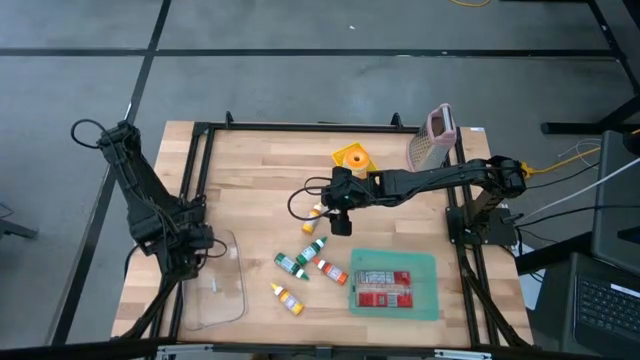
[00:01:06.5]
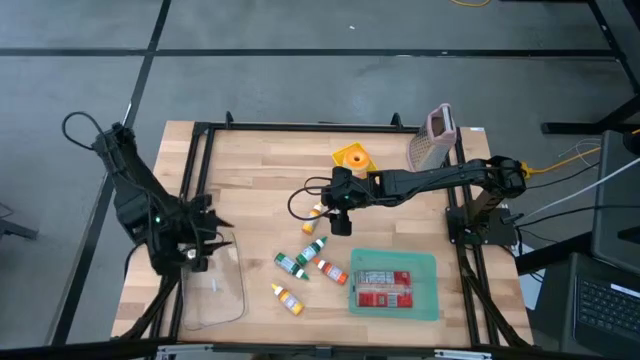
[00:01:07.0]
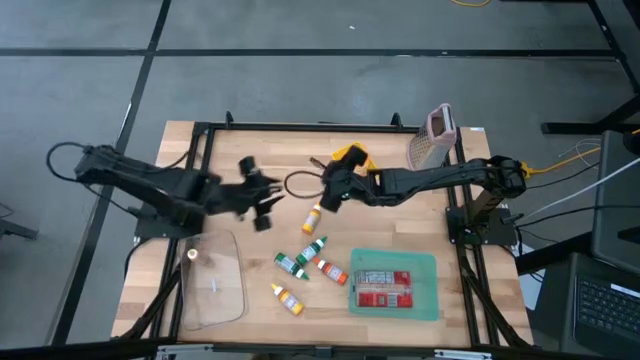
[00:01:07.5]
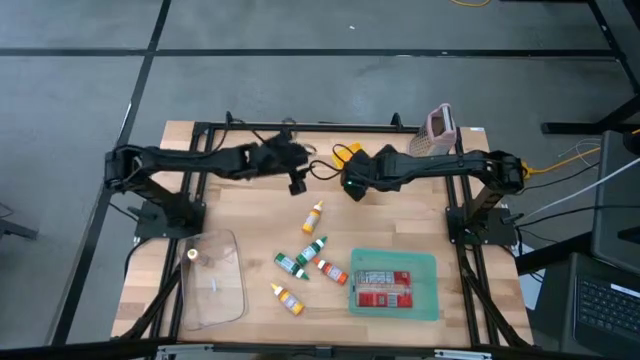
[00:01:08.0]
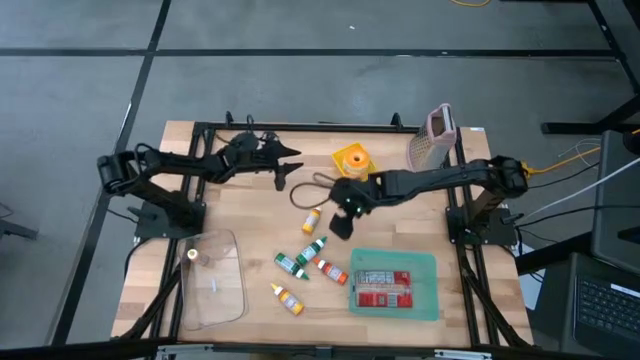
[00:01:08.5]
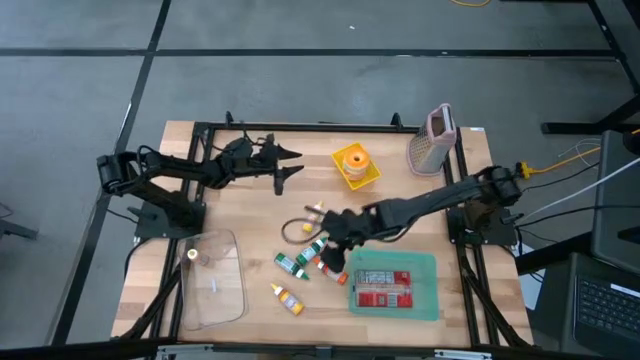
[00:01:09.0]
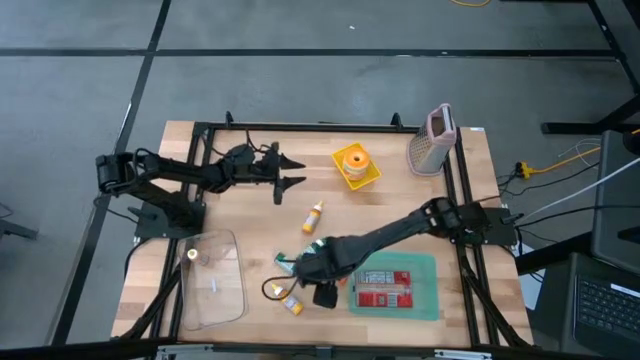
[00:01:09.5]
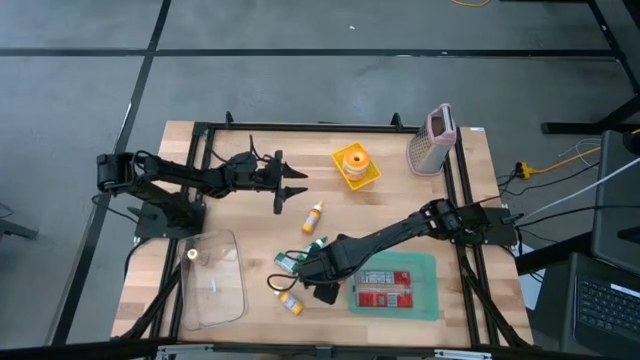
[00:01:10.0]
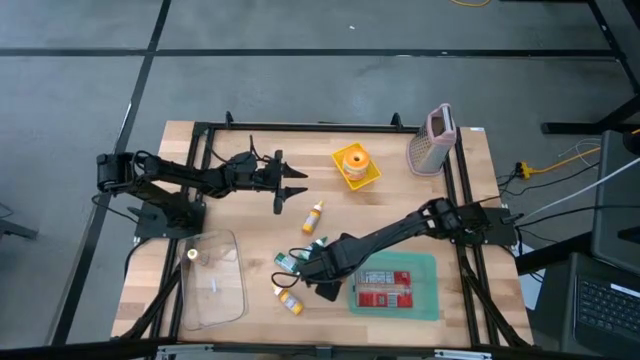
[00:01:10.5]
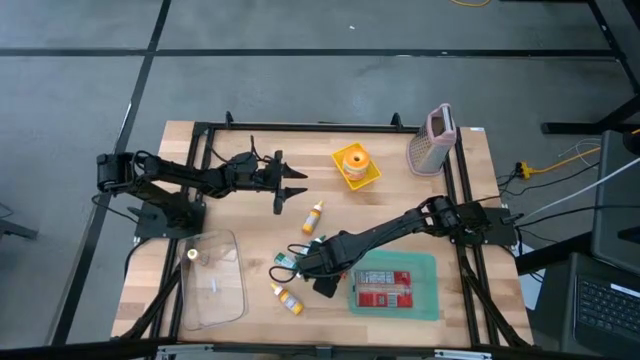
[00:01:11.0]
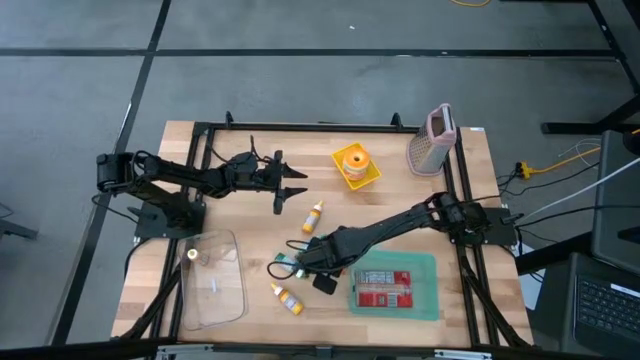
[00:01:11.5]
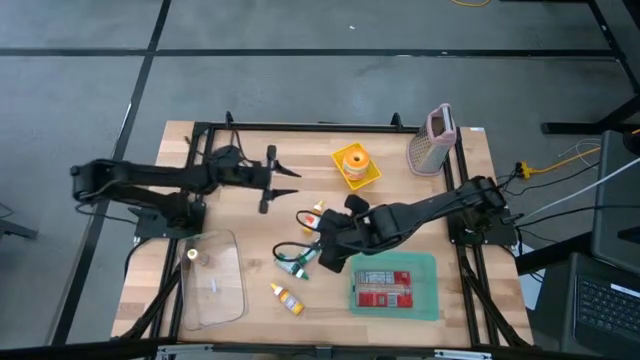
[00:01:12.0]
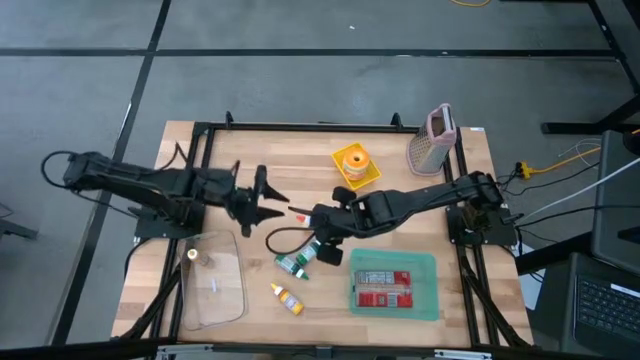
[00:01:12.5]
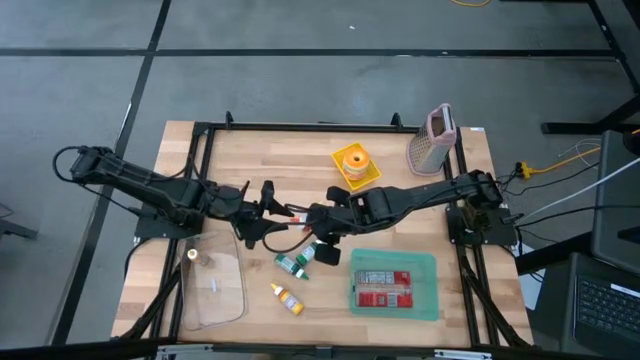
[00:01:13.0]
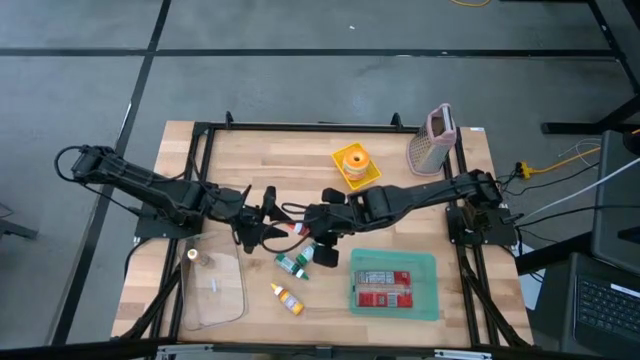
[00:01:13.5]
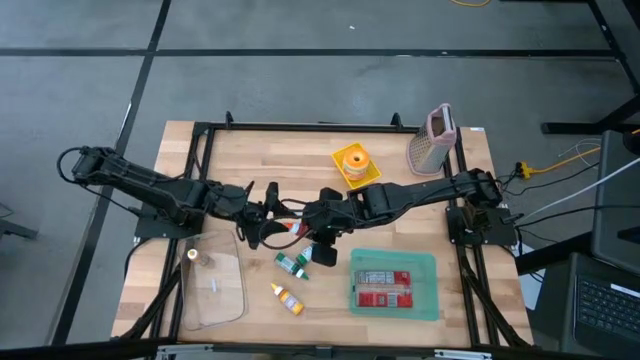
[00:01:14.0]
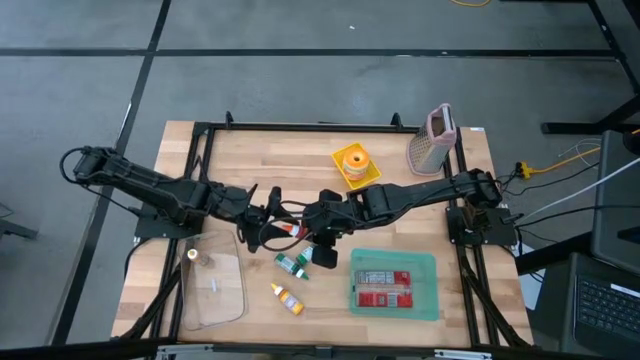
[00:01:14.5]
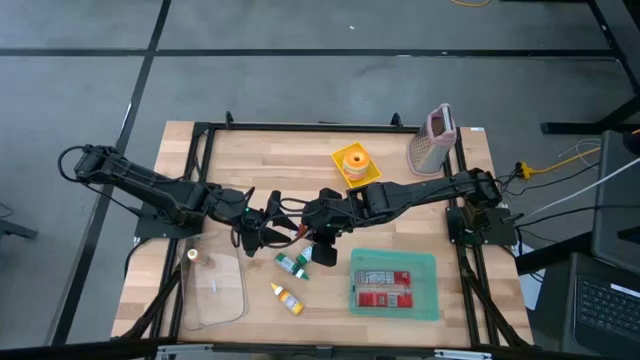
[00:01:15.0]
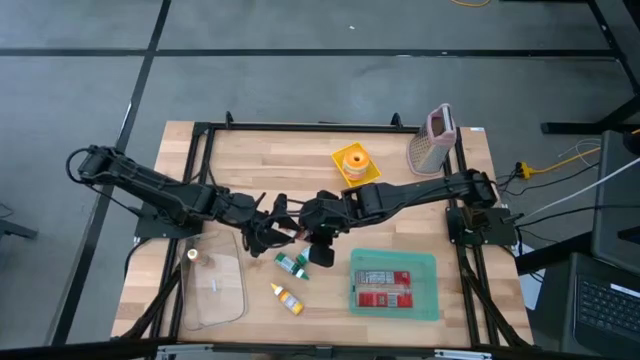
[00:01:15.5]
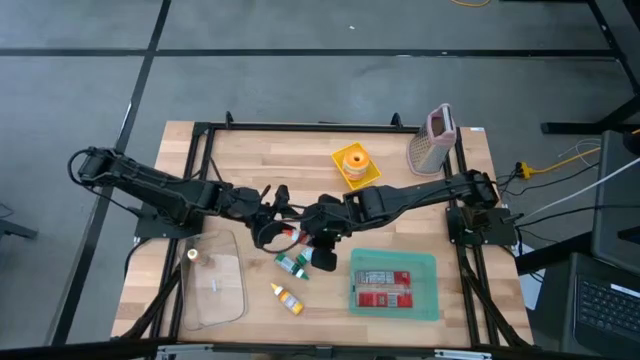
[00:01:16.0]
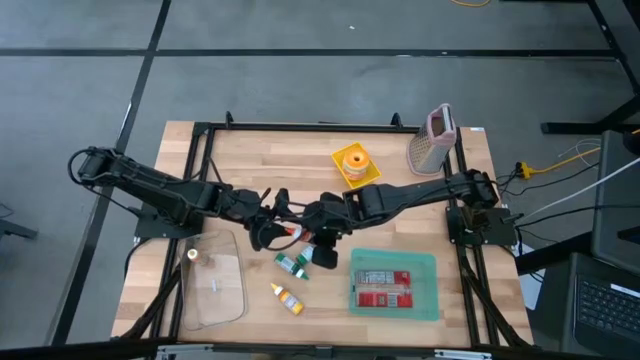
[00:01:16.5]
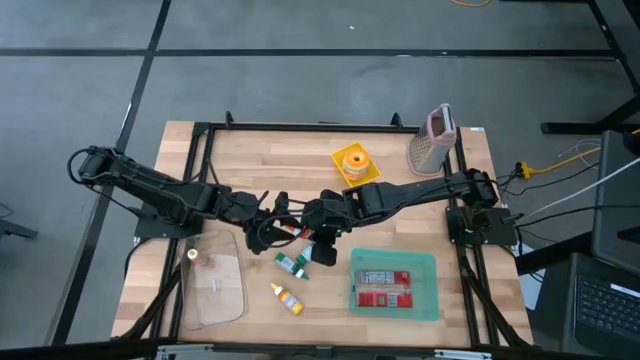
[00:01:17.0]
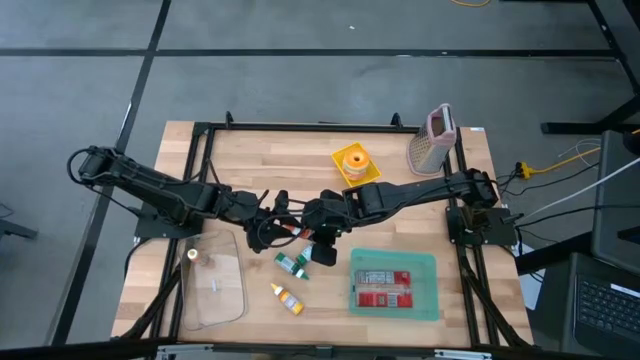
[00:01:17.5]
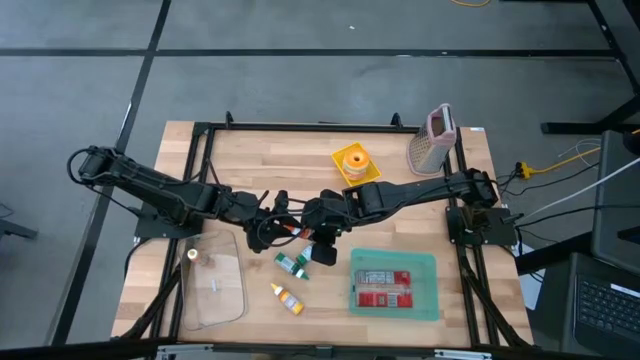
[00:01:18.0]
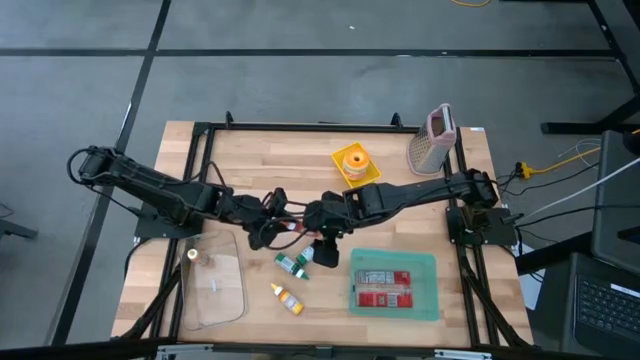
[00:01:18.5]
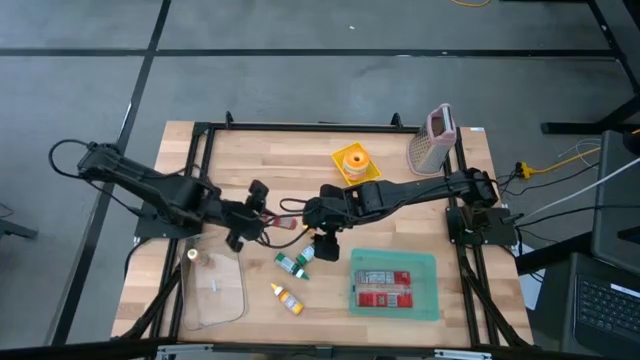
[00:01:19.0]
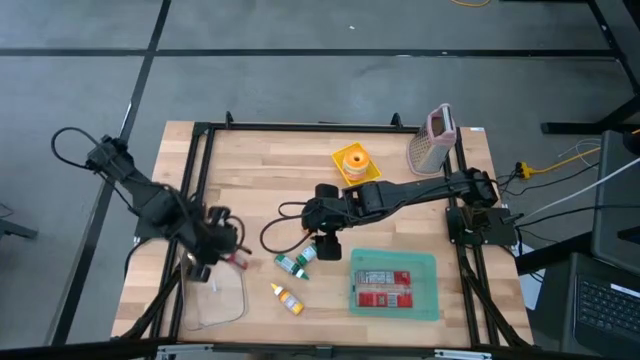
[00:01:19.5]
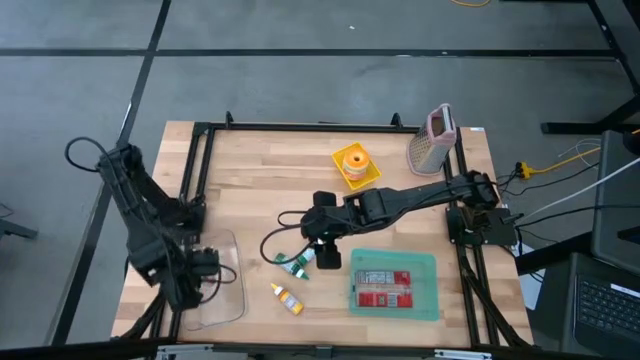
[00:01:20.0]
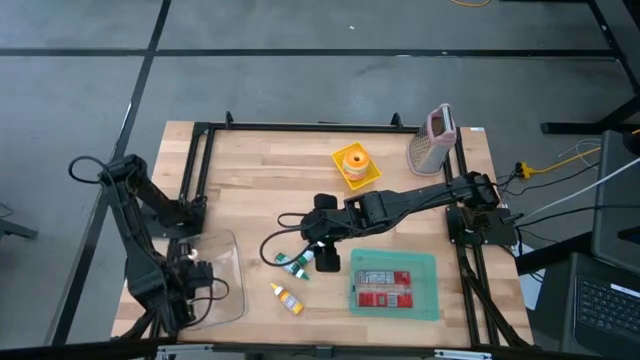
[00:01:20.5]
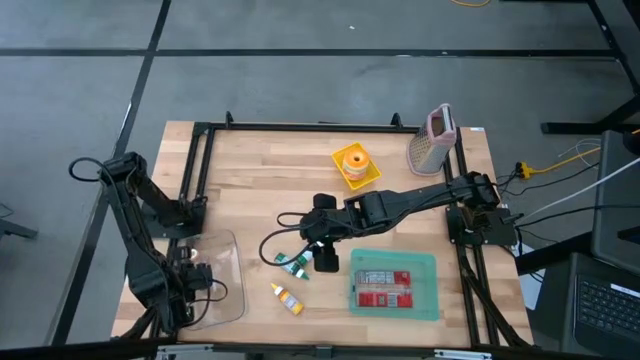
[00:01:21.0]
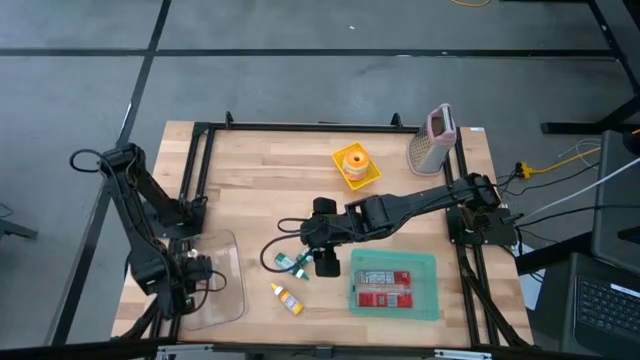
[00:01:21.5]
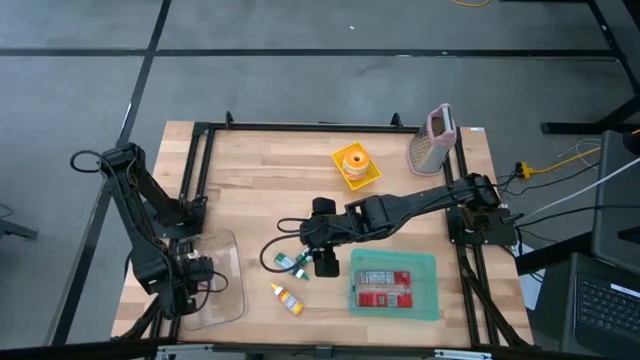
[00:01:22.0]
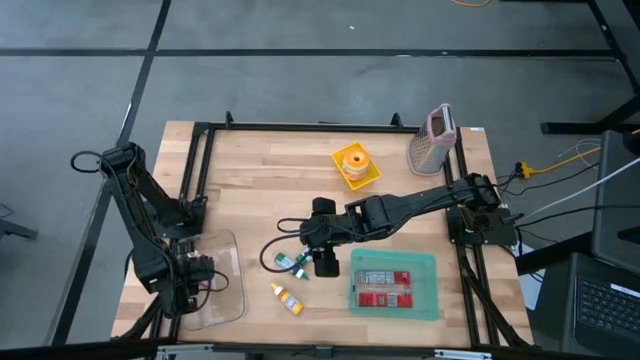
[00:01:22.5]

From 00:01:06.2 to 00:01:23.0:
Put the orange food coloring bottle into the transparent bin
